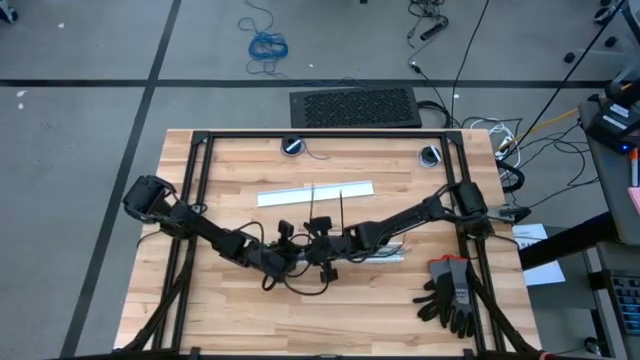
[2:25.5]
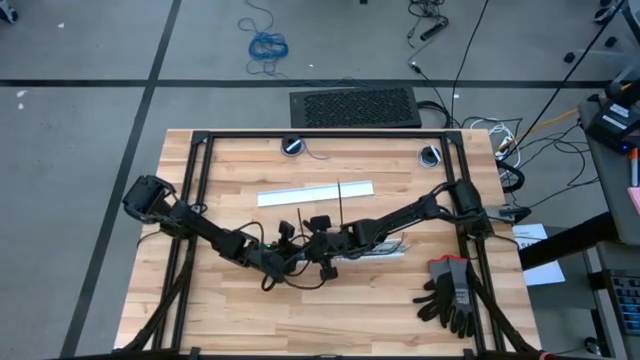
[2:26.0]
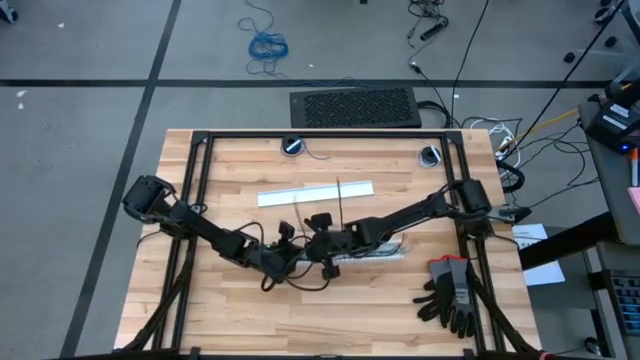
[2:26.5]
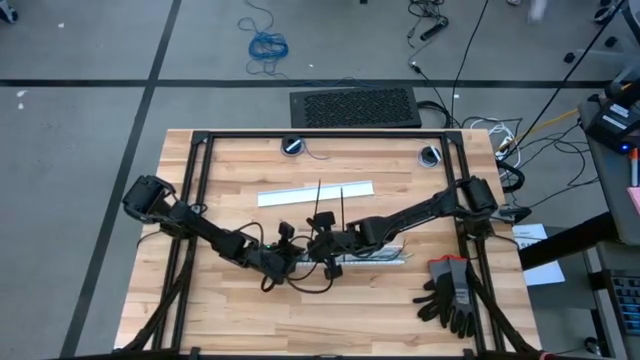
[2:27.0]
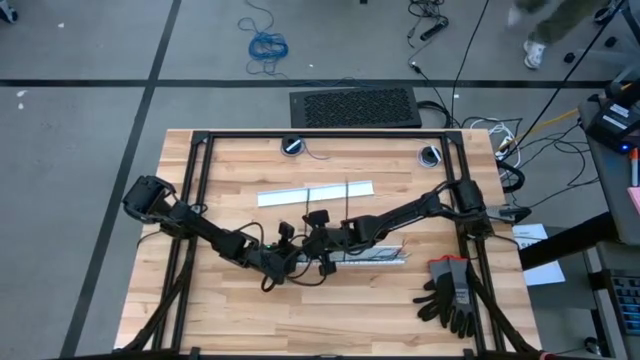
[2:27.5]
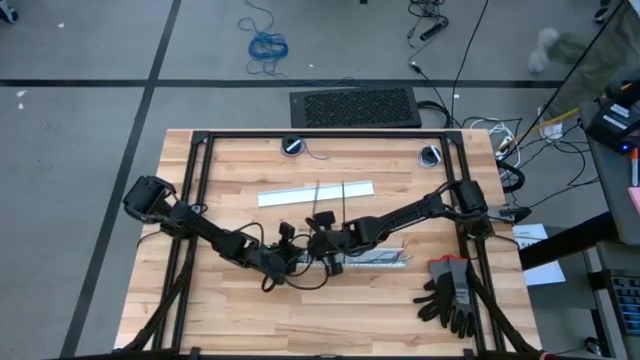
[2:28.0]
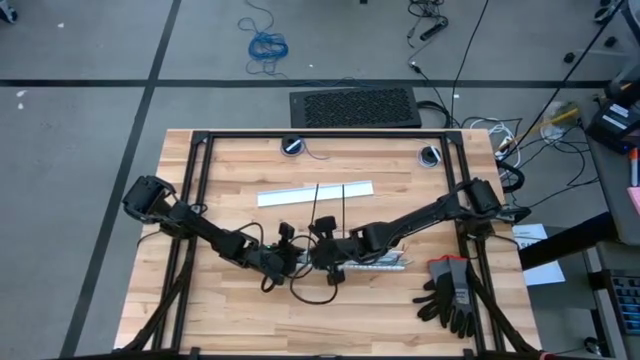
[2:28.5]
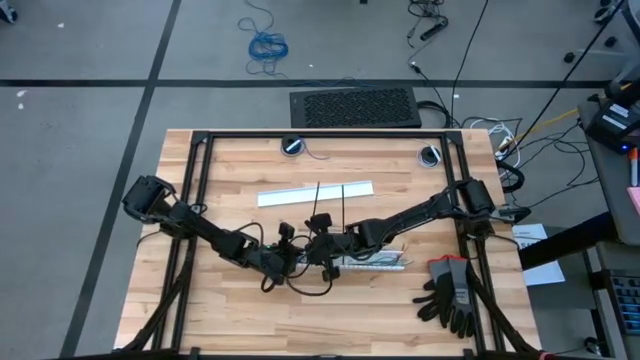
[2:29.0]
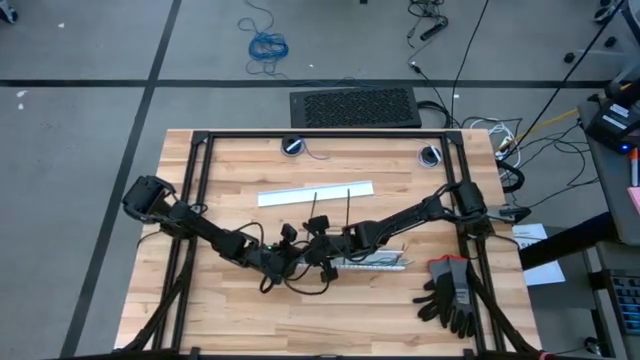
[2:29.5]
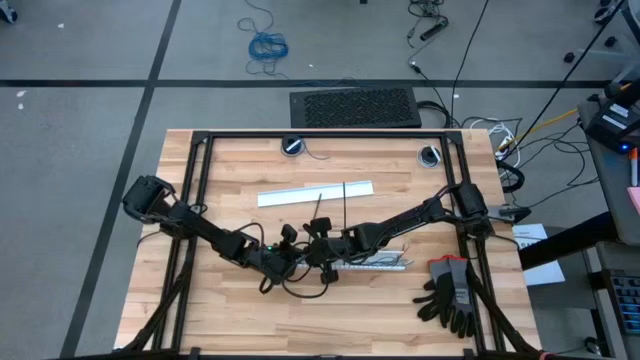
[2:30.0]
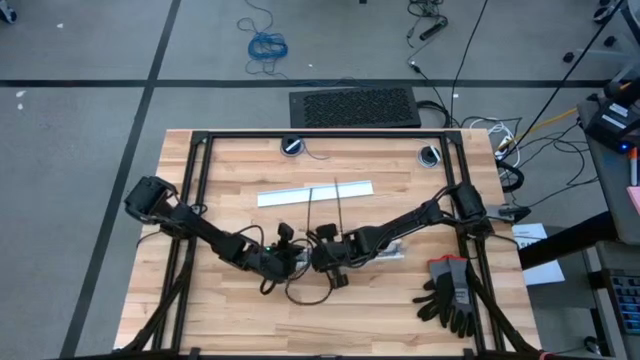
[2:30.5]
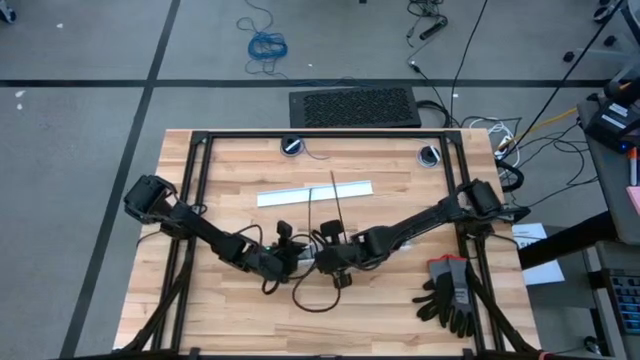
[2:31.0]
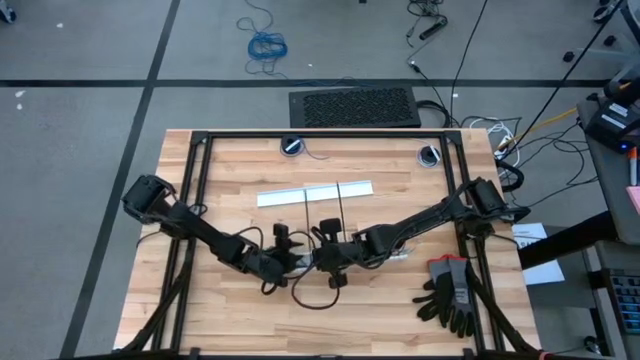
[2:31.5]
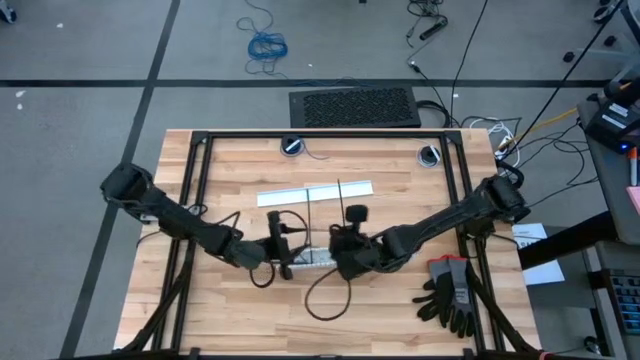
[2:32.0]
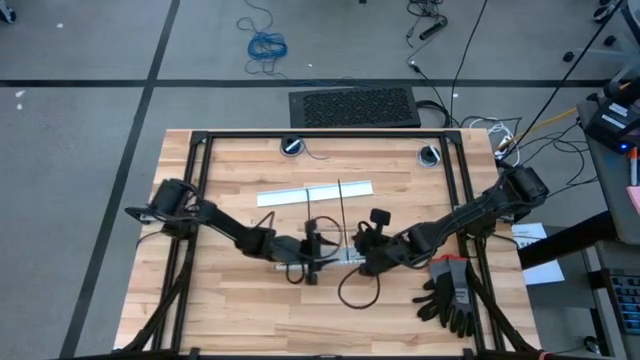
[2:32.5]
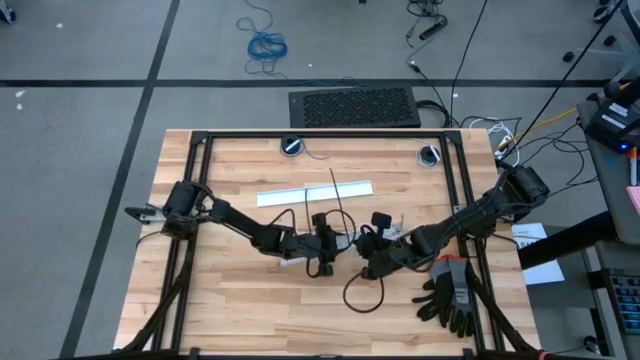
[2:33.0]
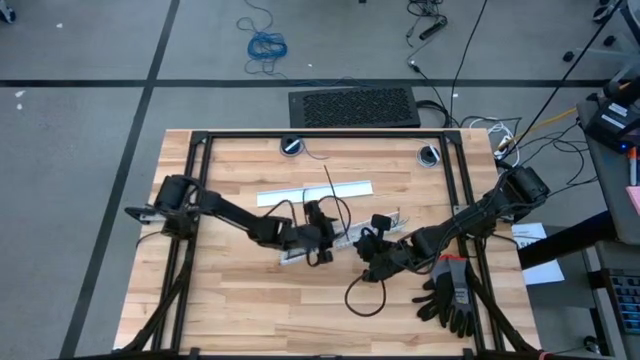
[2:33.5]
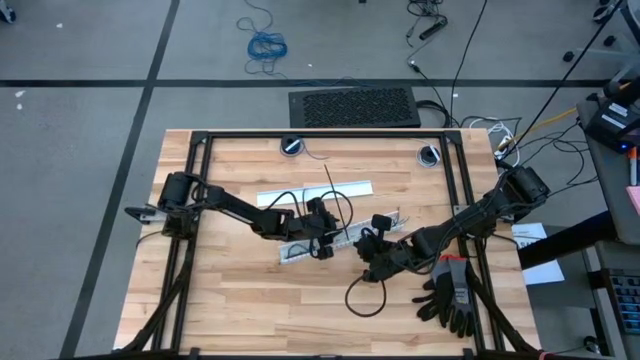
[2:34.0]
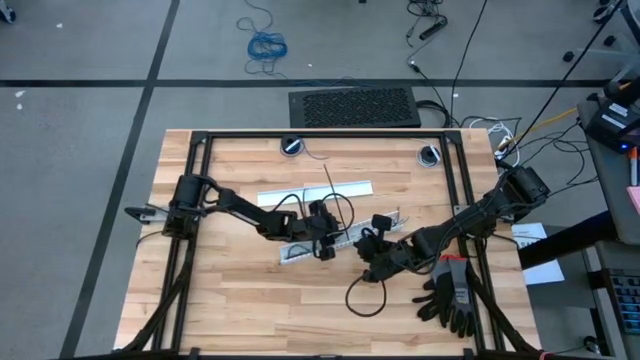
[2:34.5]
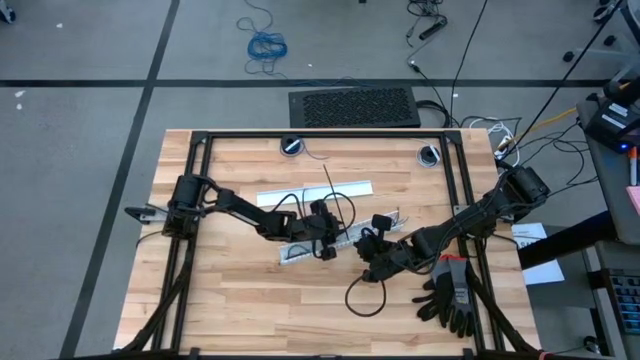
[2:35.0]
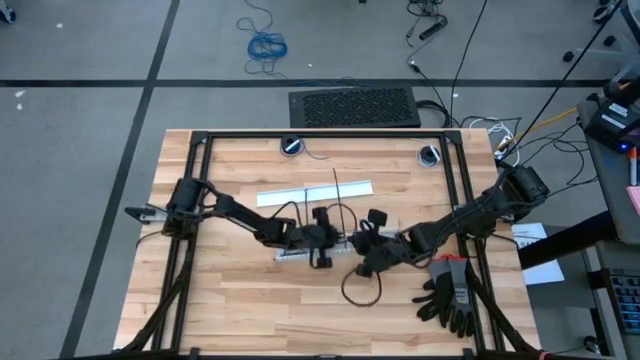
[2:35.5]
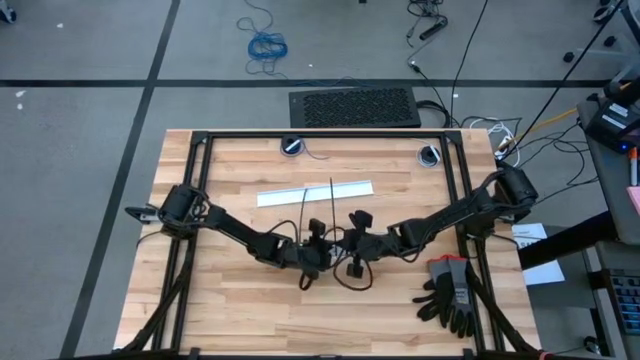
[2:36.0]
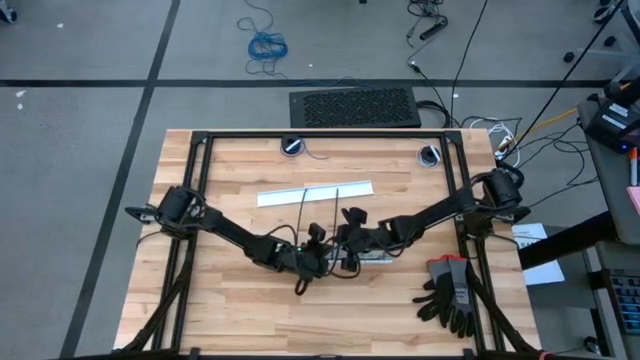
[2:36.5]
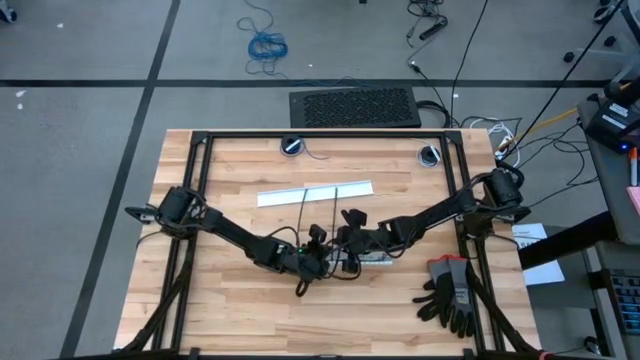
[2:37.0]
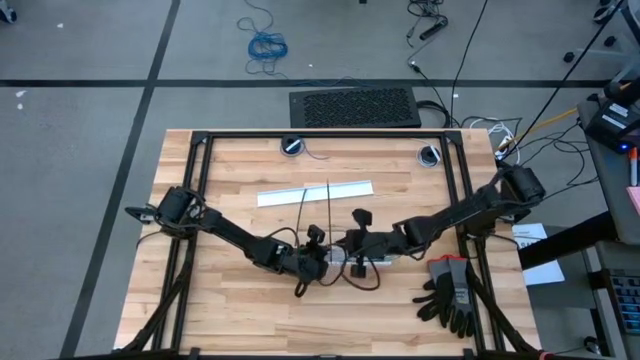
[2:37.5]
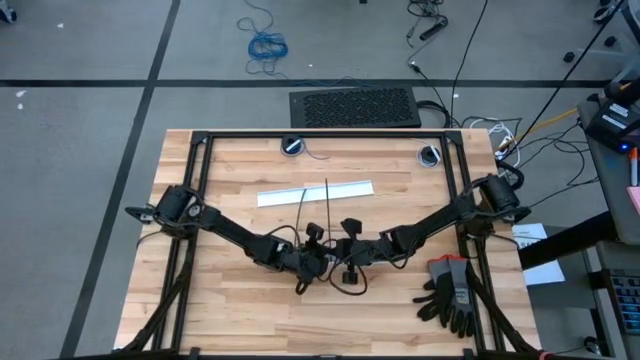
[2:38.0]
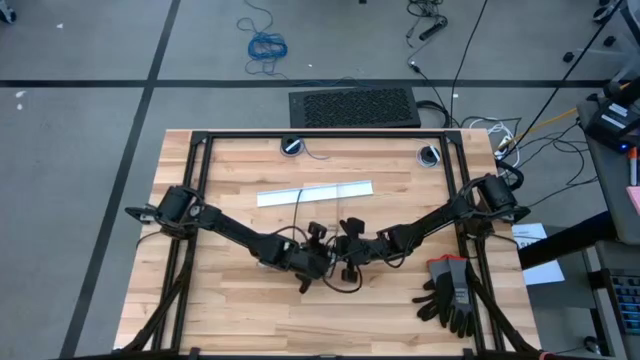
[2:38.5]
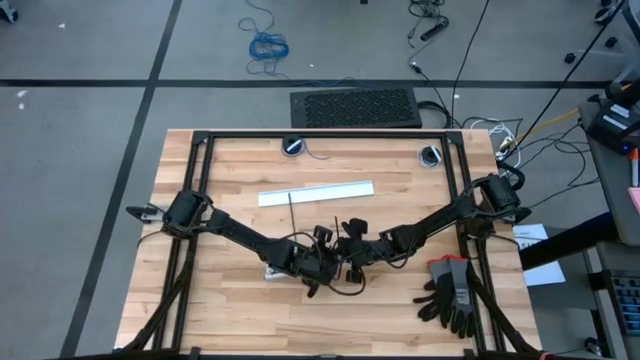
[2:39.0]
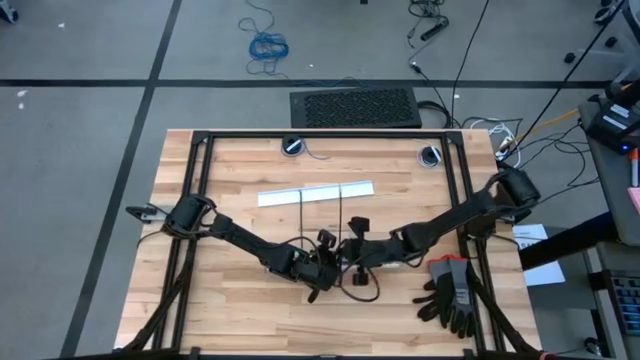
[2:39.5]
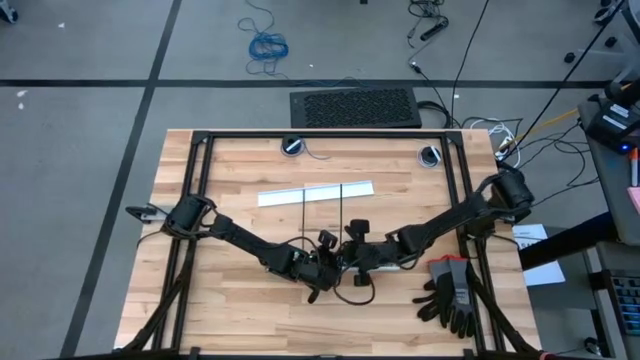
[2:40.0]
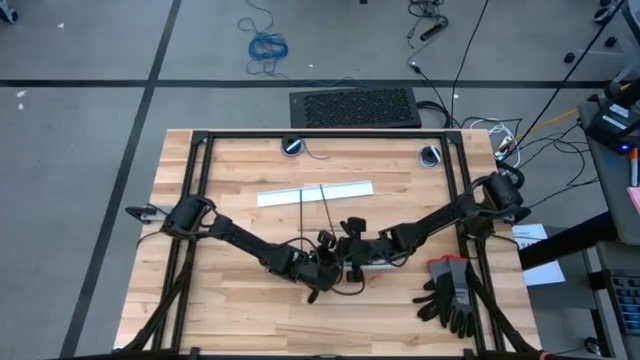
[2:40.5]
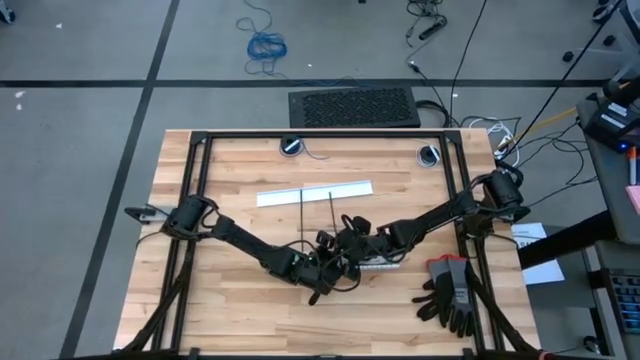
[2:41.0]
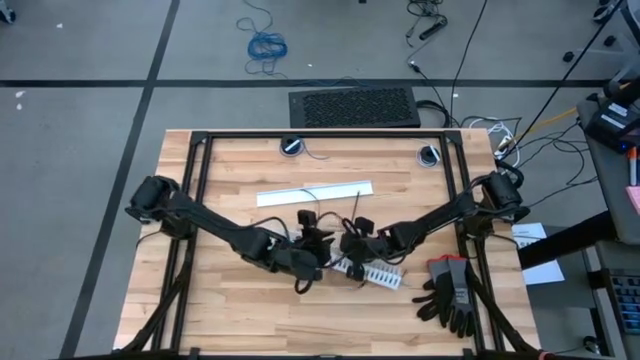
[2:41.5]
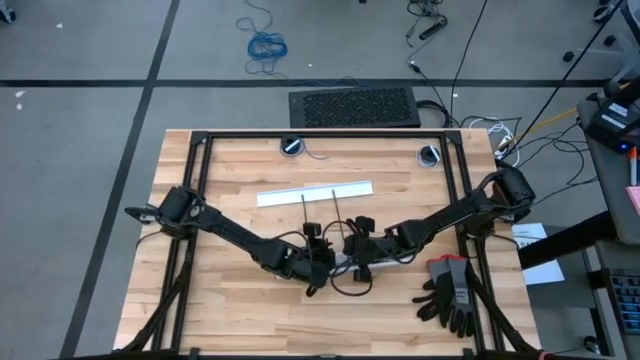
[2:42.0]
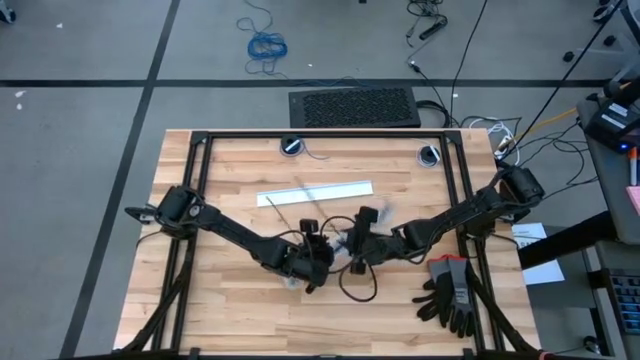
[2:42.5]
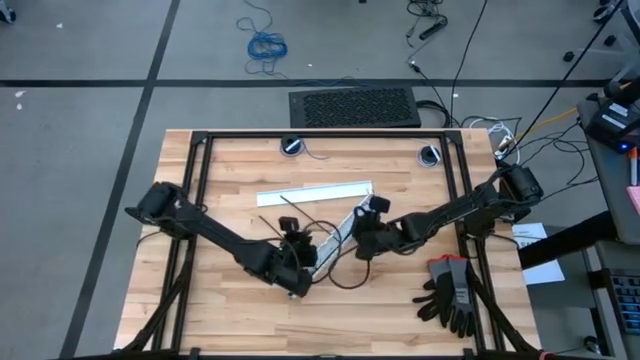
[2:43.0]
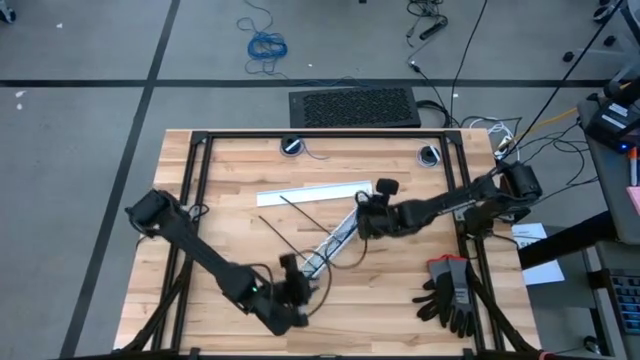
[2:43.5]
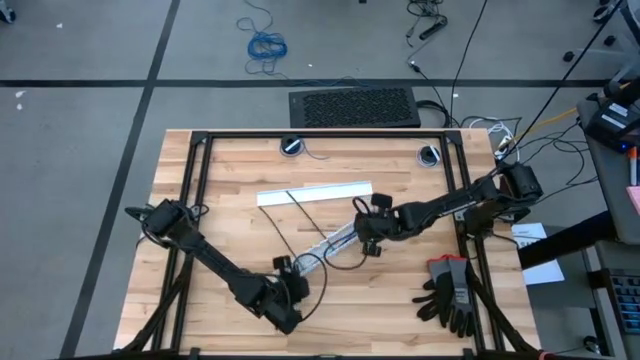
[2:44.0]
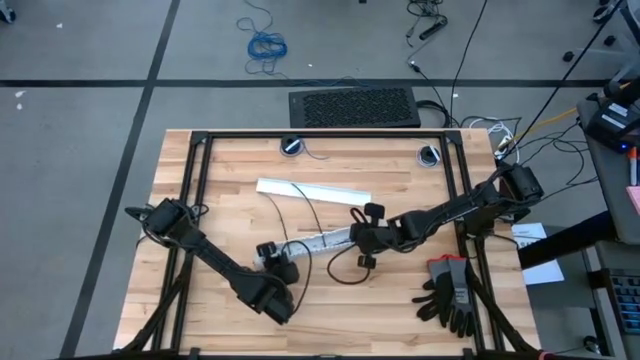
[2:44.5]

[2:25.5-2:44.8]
Task: Ziptie cables
Put the colored zip tied cable wires into the white cable duct

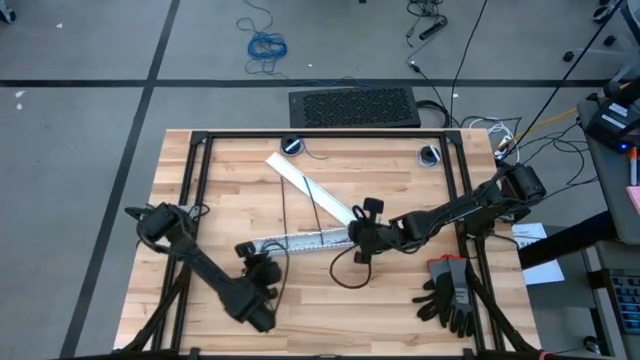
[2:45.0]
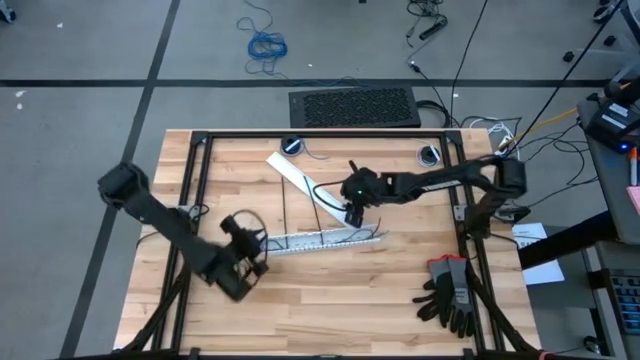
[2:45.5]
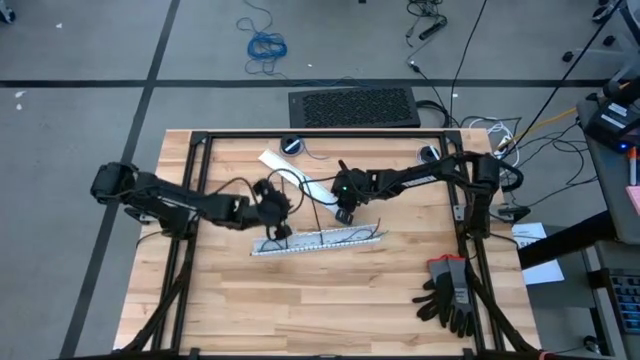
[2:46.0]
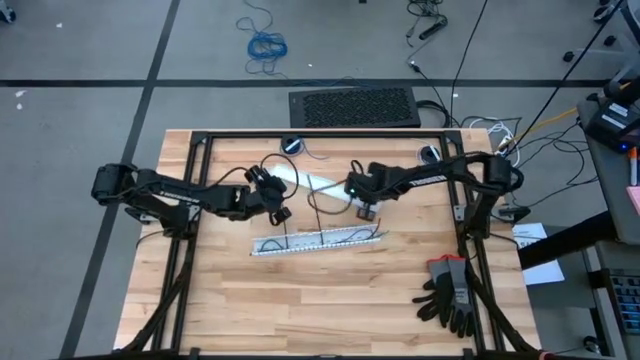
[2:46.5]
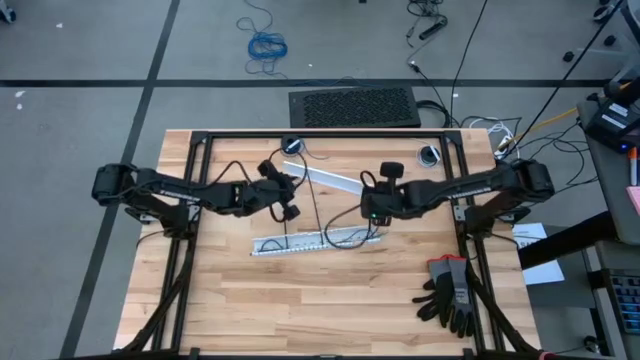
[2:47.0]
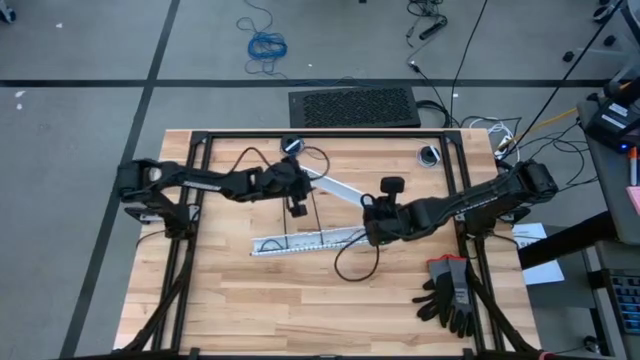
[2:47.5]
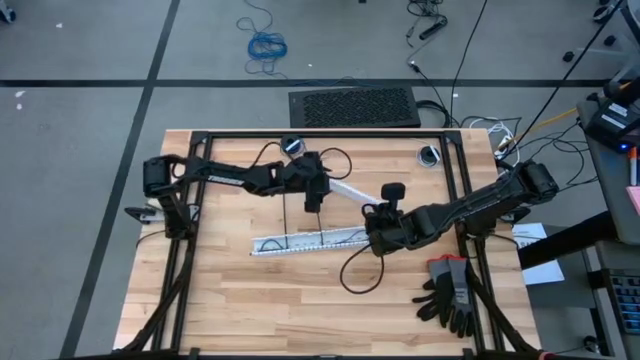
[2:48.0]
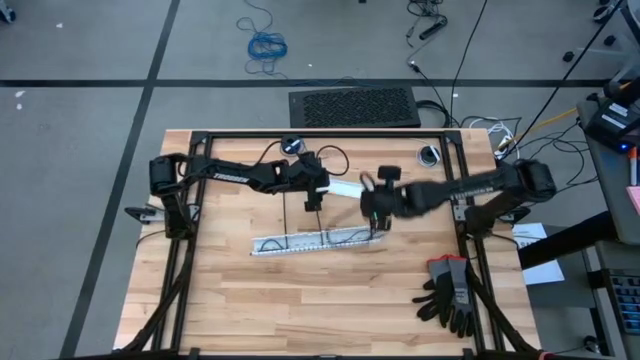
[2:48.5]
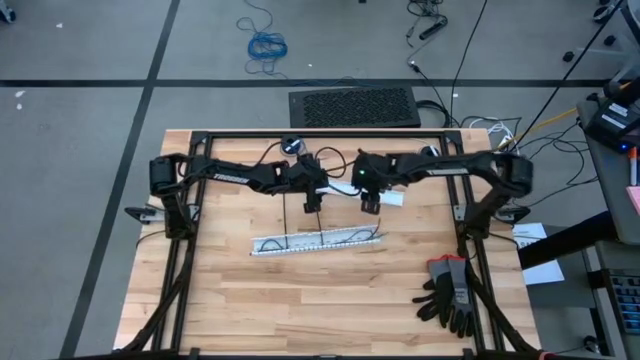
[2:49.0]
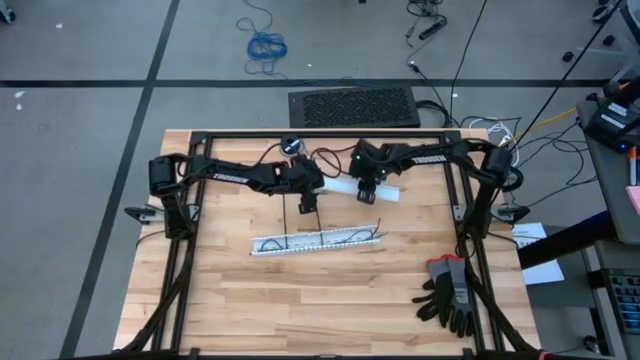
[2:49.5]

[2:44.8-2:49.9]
Close the white cable duct
